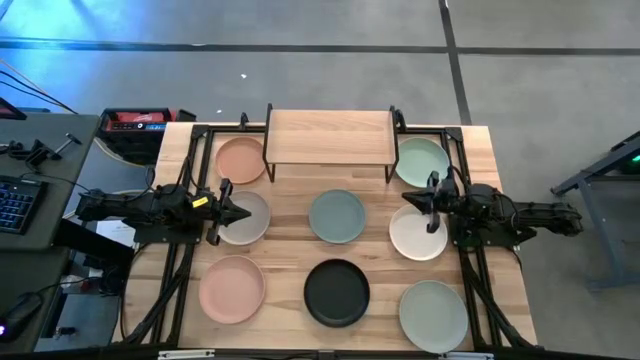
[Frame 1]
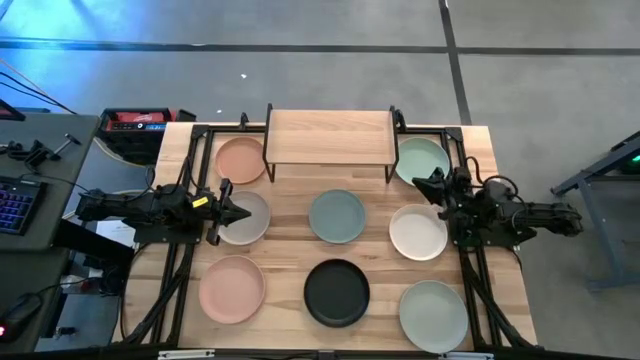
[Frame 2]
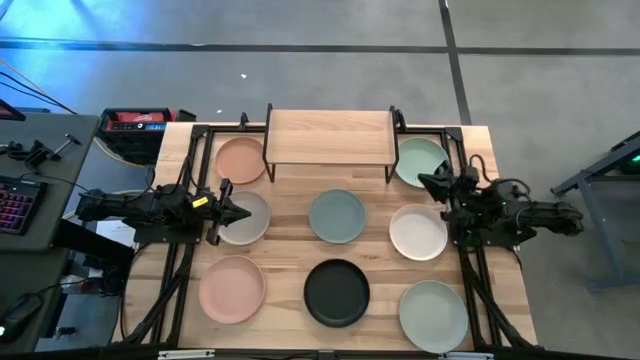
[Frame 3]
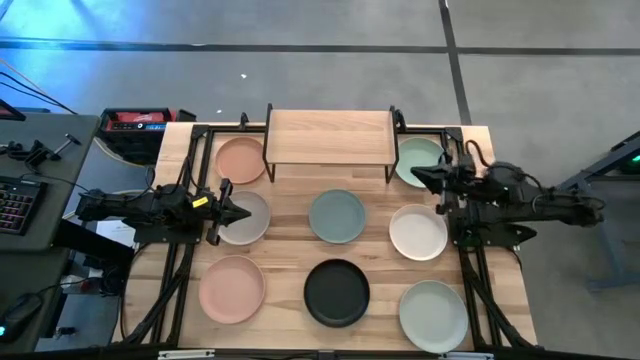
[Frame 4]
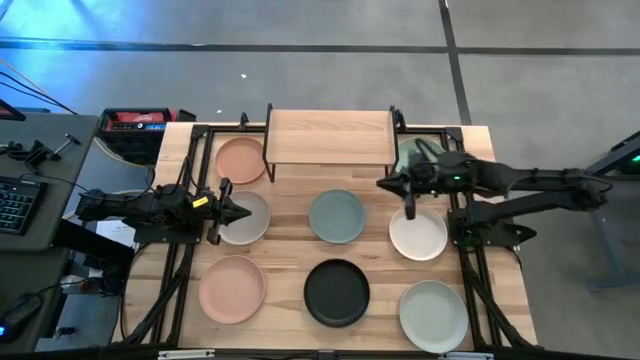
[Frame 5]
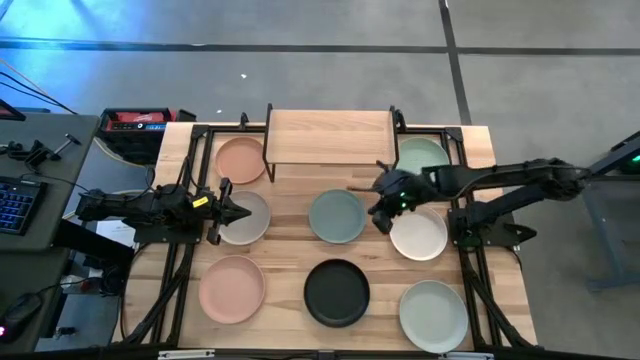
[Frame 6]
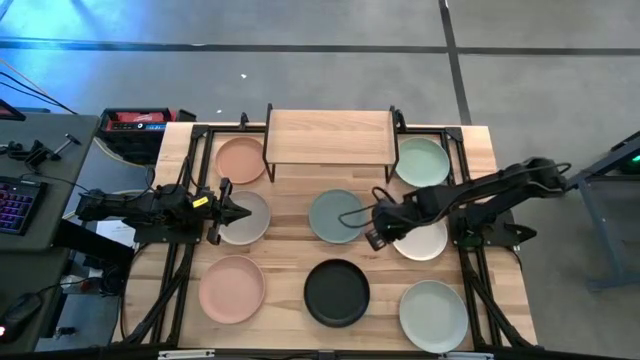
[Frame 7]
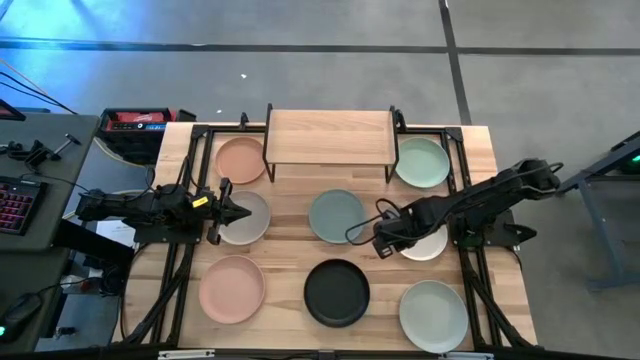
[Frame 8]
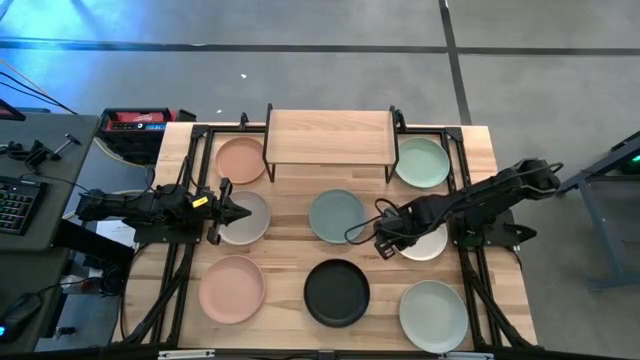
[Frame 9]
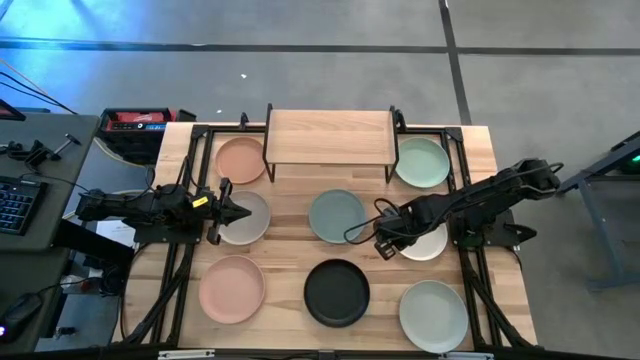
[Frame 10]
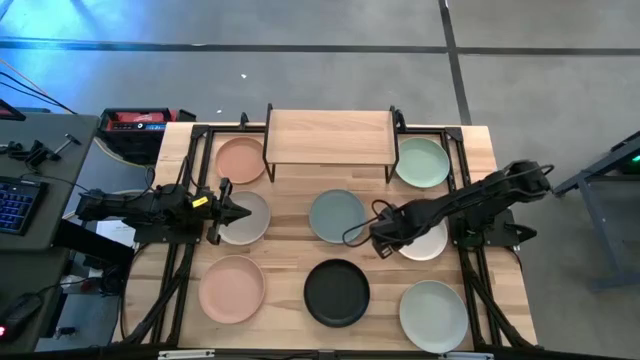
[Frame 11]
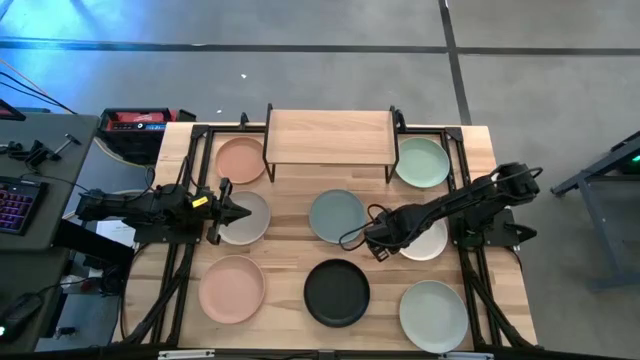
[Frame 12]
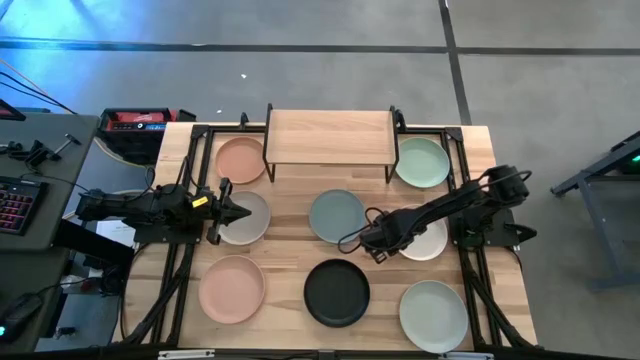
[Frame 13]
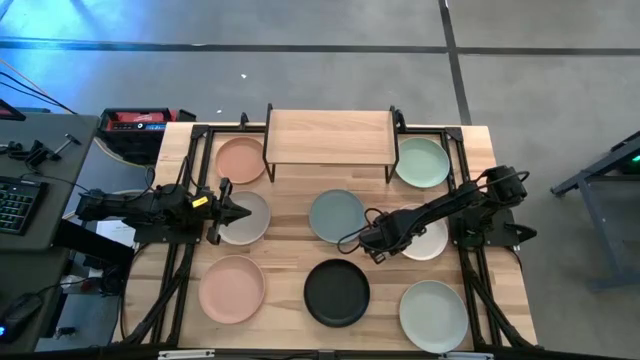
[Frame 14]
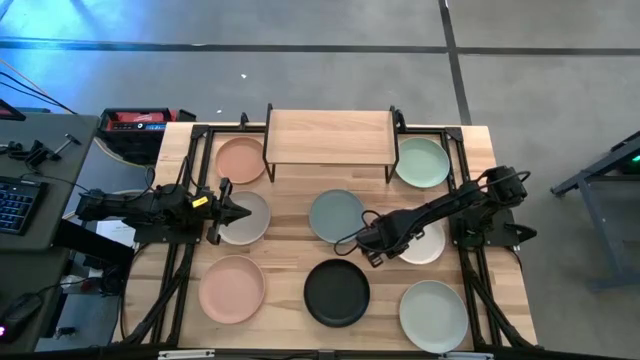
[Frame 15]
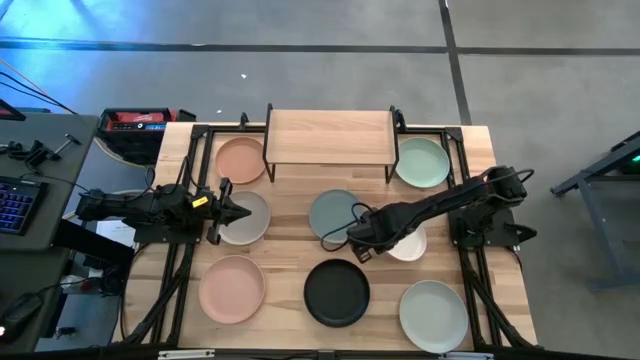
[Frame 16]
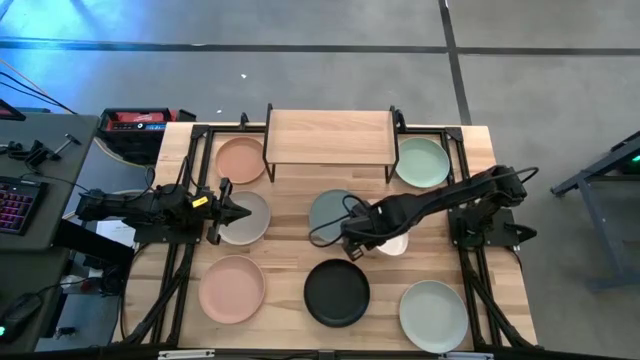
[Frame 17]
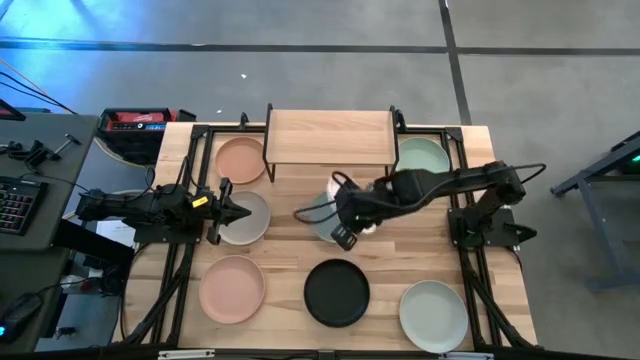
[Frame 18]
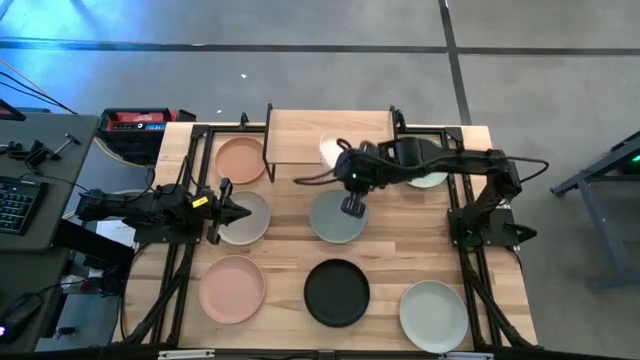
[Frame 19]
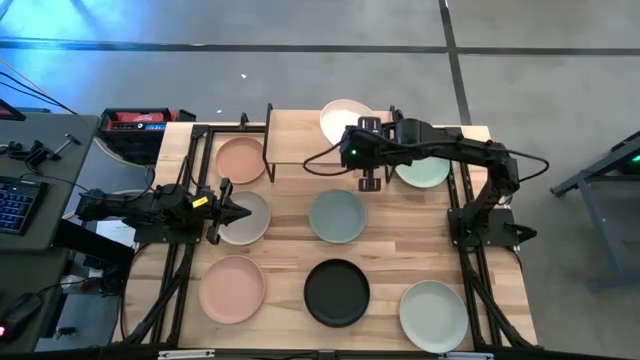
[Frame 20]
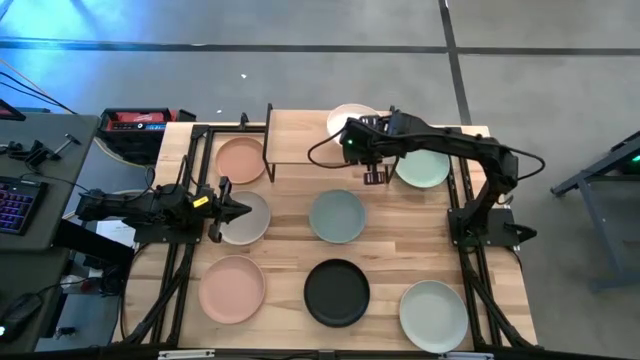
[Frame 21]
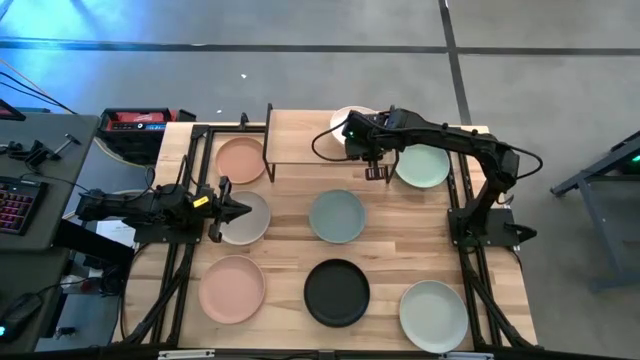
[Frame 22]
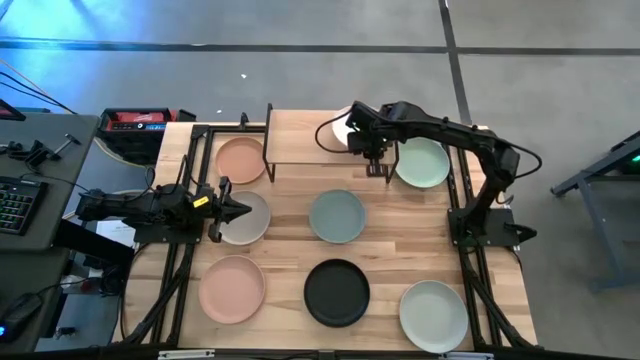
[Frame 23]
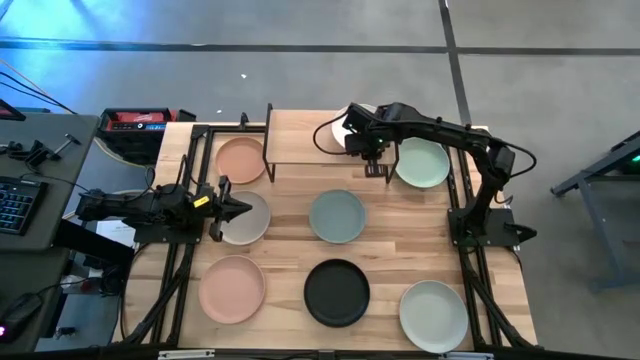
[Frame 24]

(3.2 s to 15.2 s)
Task: Place and stack plates onto a shelf
Put the white plate on the shelf

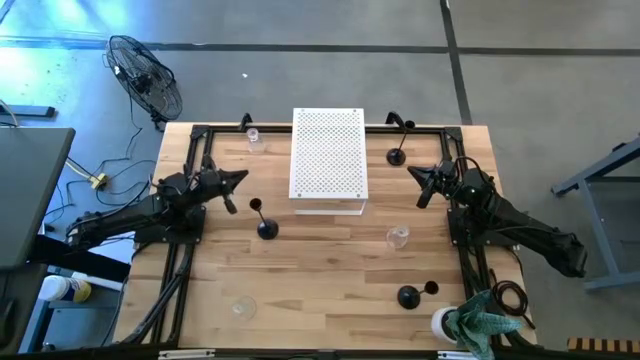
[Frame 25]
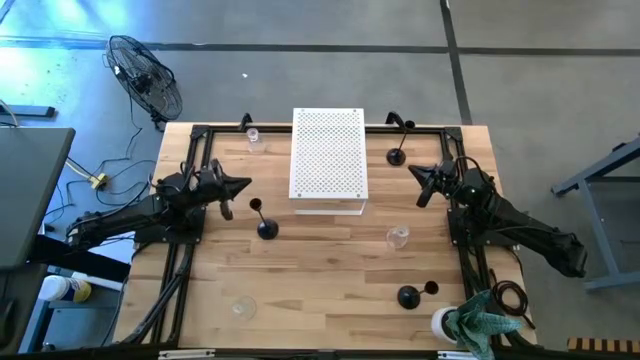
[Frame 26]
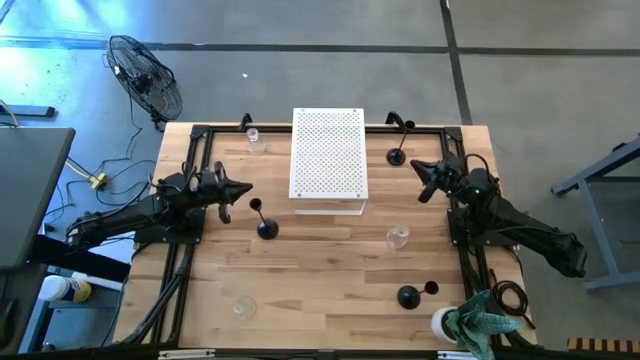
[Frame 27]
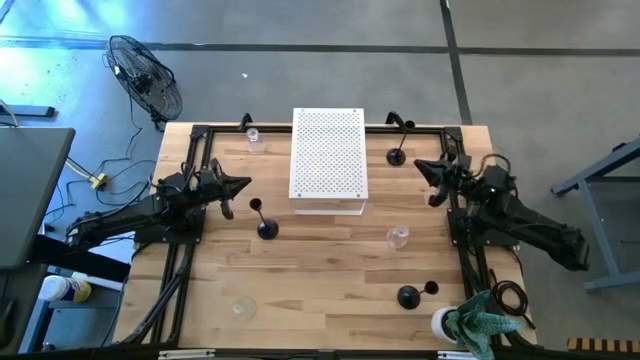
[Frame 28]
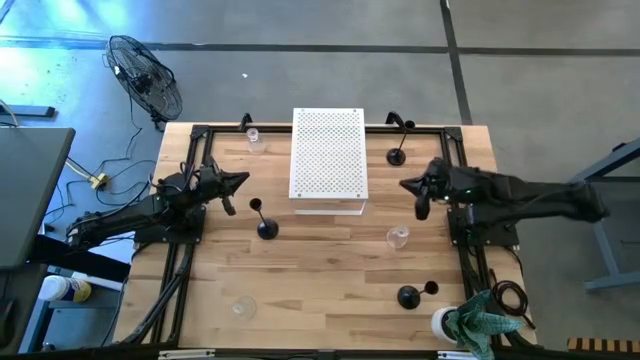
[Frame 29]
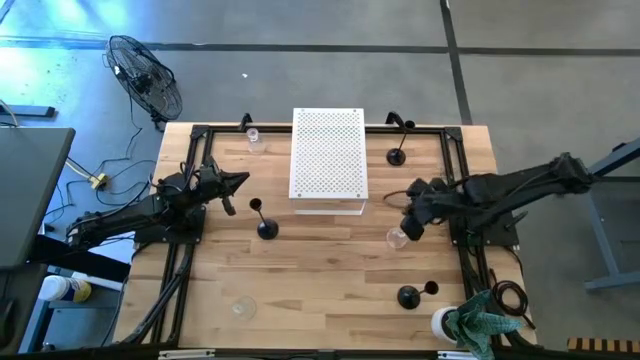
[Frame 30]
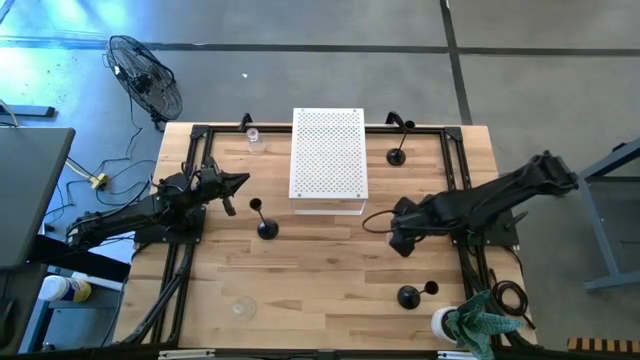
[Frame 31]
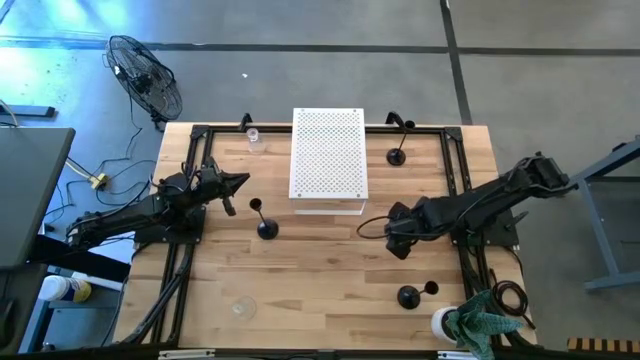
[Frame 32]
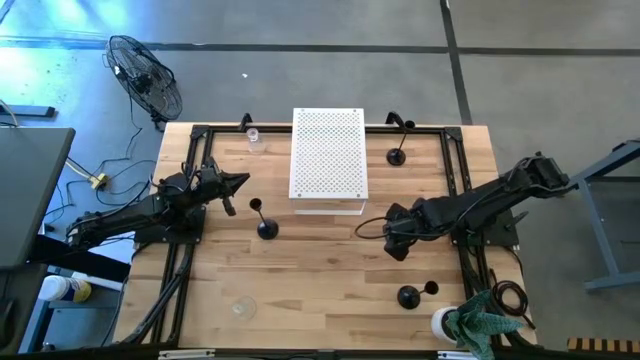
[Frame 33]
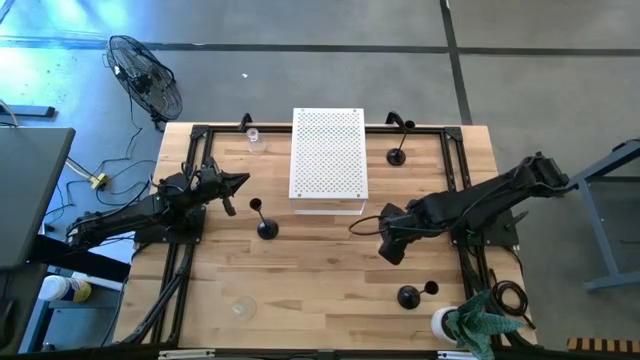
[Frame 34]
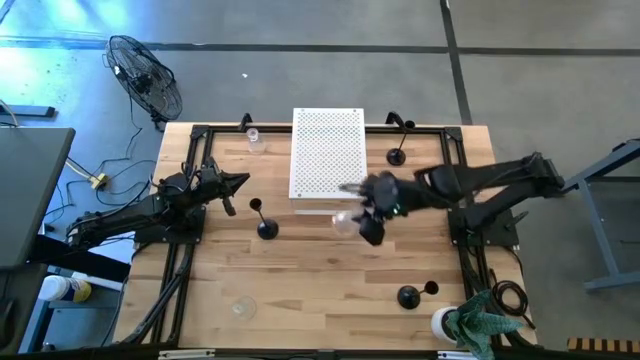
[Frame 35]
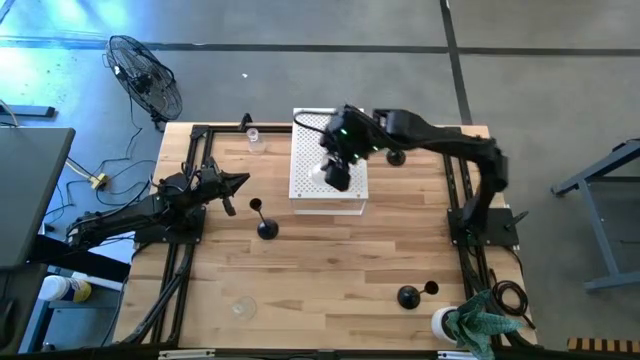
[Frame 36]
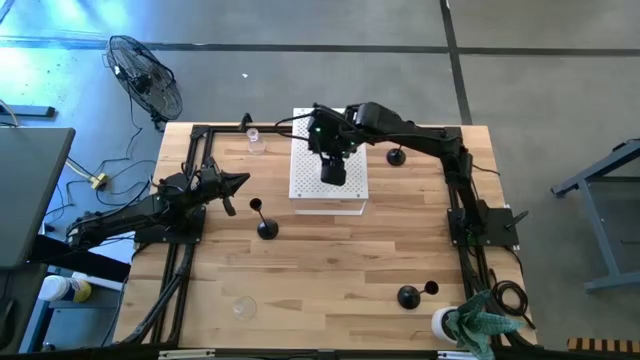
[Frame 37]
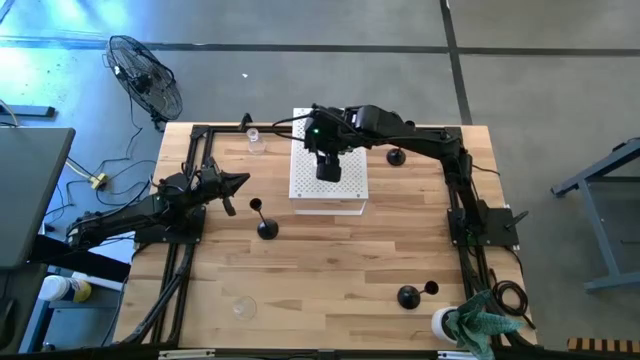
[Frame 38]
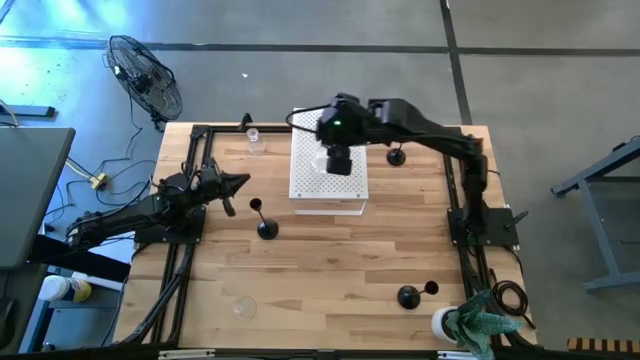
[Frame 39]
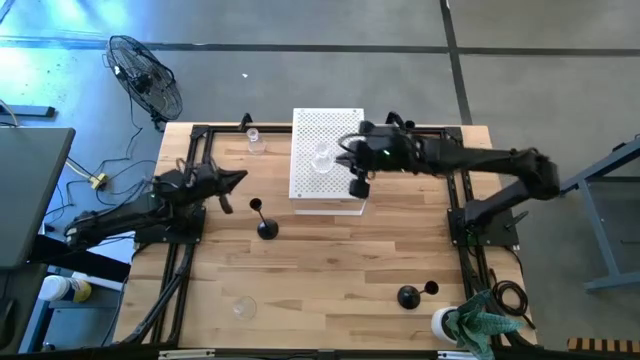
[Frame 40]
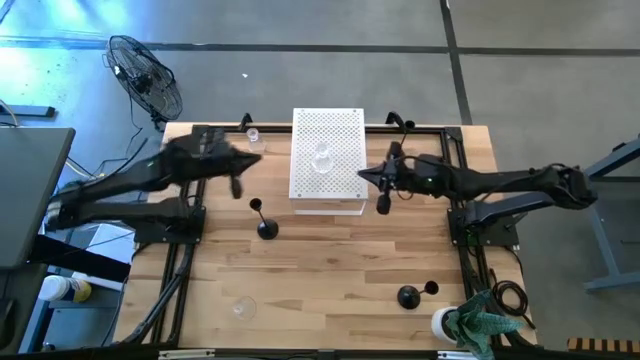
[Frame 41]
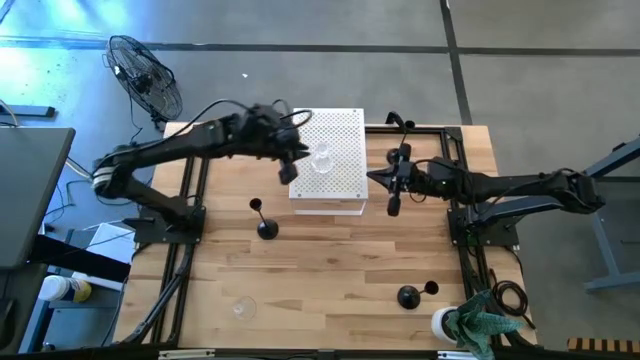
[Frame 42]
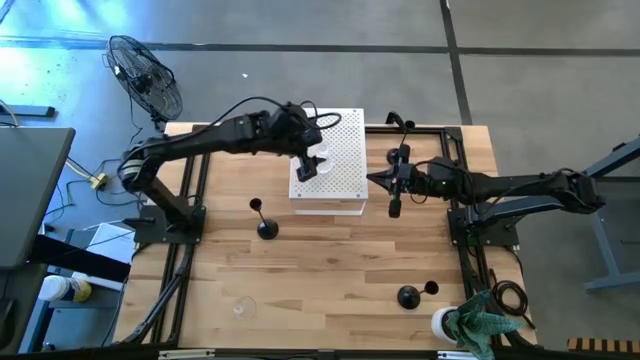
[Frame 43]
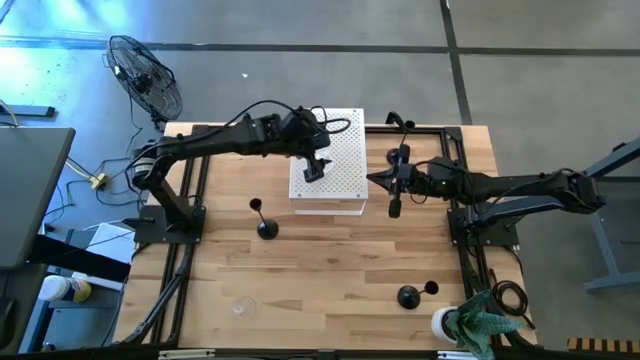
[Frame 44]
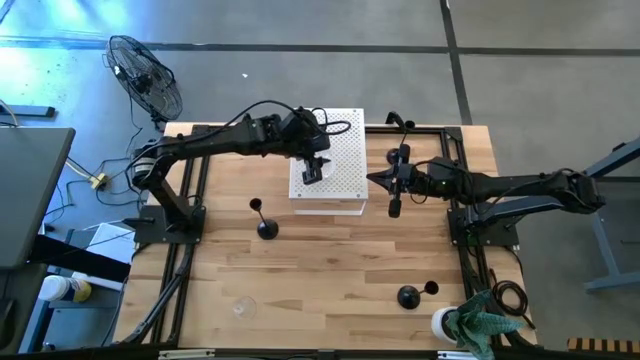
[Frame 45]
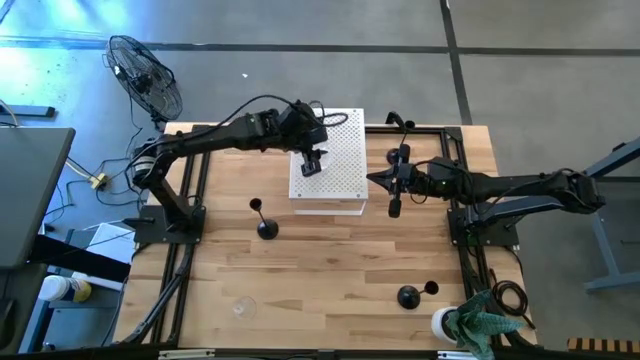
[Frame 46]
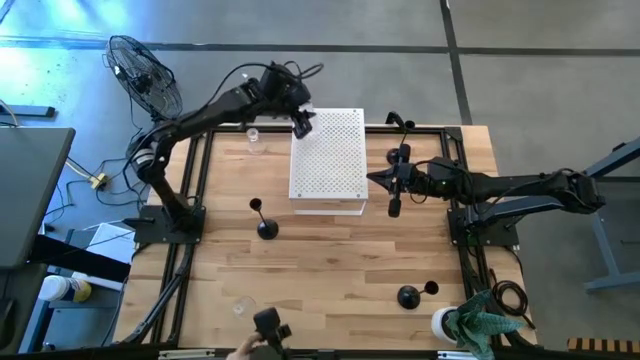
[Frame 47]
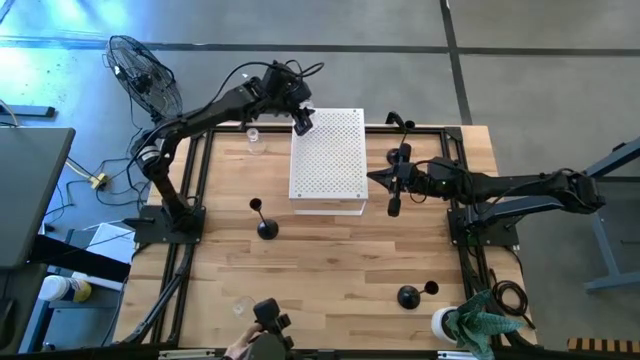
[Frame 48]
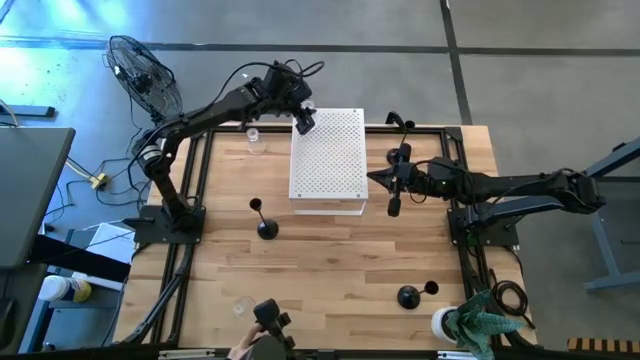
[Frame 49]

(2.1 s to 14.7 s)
Task: Pick & Place candle stick holders
Put the right transparent candle holder on the shelf
